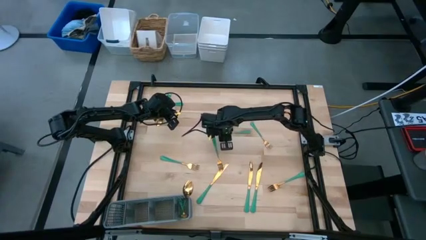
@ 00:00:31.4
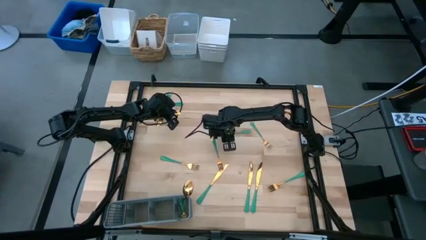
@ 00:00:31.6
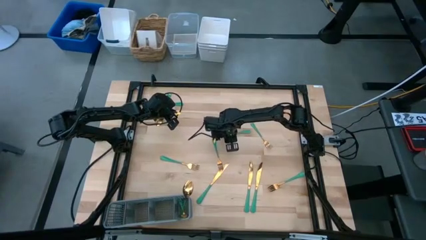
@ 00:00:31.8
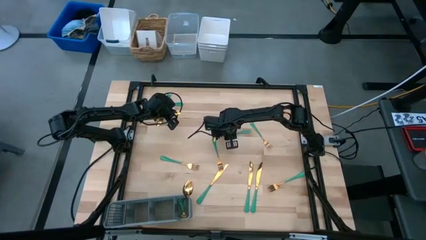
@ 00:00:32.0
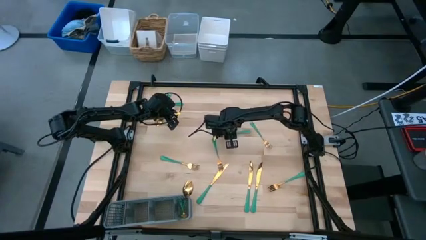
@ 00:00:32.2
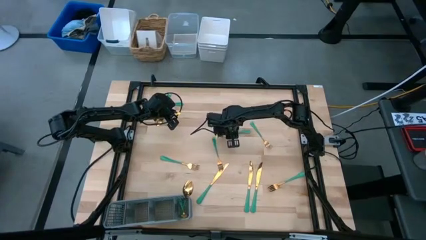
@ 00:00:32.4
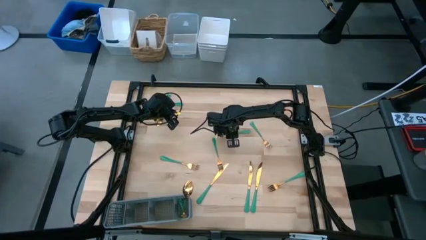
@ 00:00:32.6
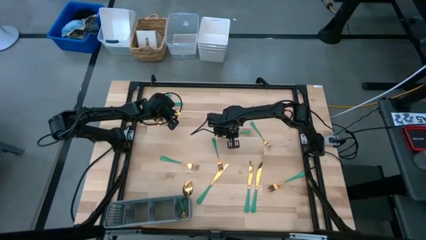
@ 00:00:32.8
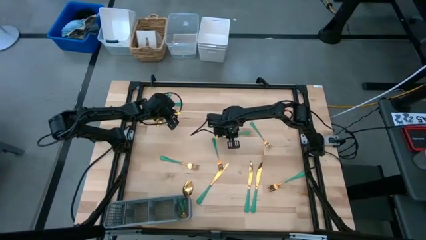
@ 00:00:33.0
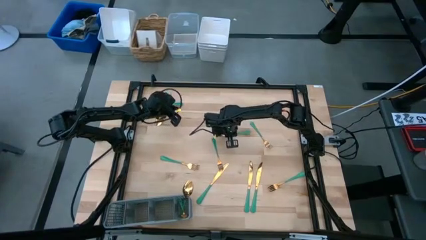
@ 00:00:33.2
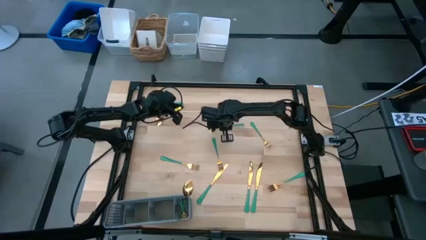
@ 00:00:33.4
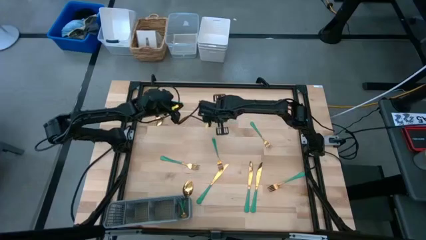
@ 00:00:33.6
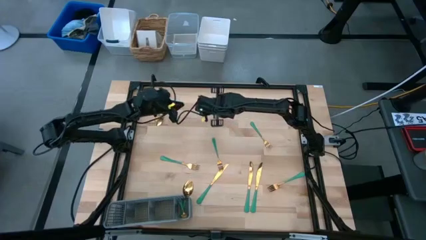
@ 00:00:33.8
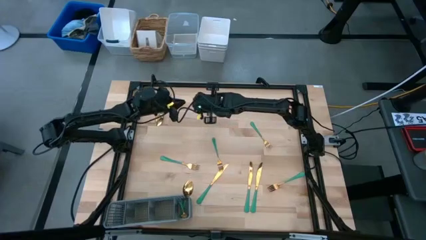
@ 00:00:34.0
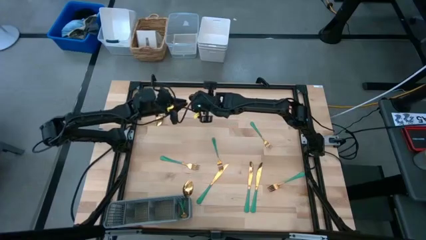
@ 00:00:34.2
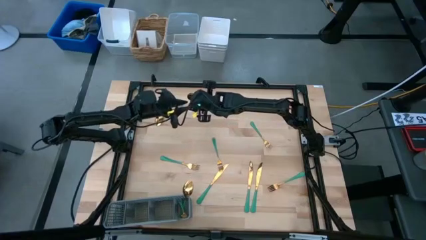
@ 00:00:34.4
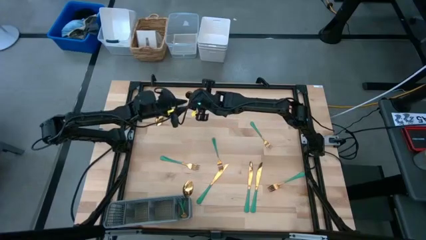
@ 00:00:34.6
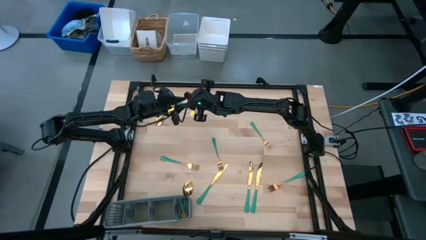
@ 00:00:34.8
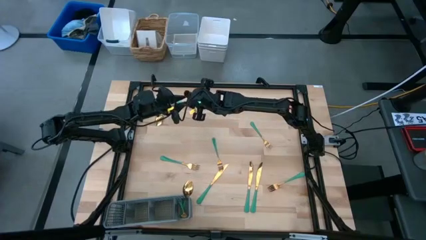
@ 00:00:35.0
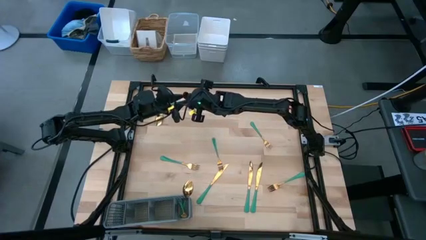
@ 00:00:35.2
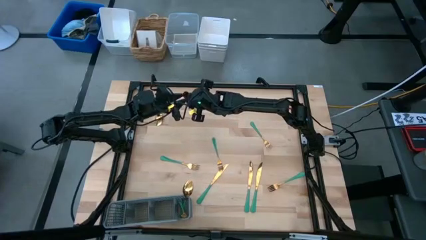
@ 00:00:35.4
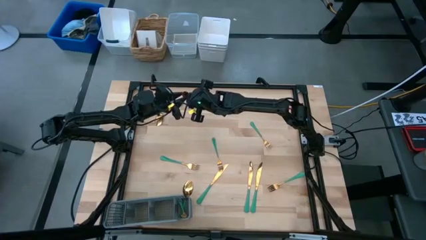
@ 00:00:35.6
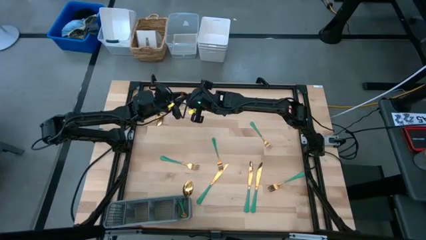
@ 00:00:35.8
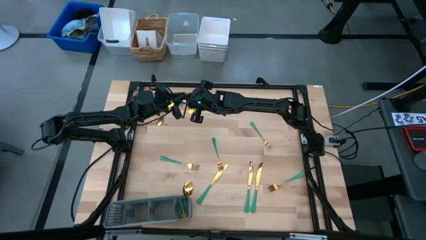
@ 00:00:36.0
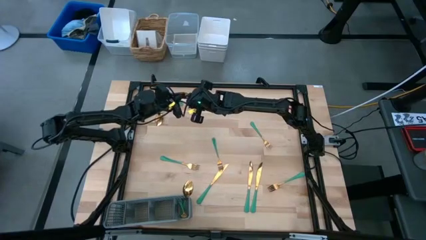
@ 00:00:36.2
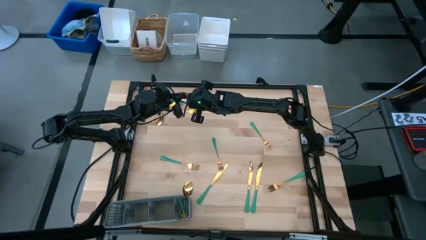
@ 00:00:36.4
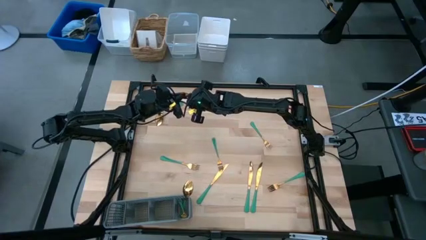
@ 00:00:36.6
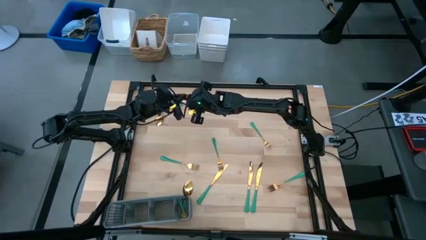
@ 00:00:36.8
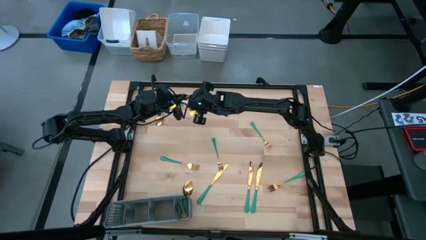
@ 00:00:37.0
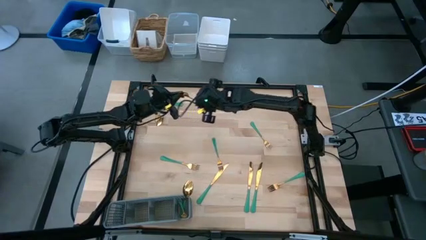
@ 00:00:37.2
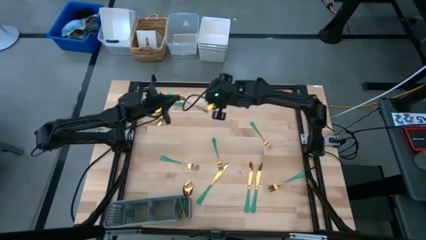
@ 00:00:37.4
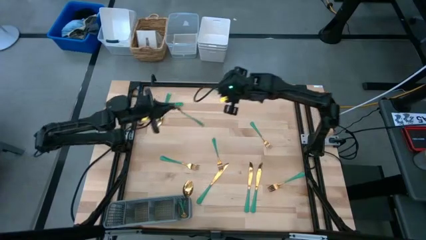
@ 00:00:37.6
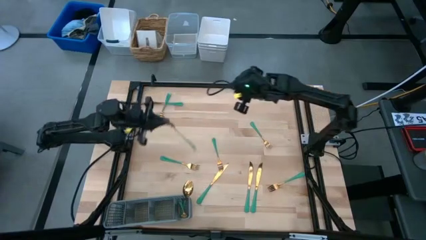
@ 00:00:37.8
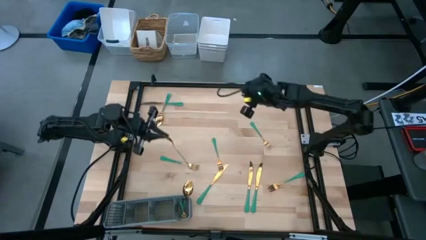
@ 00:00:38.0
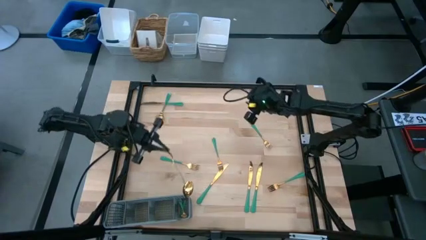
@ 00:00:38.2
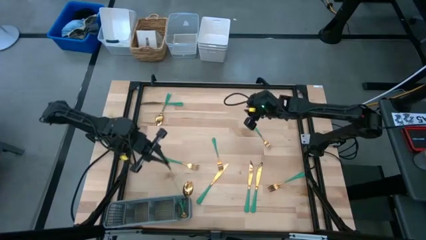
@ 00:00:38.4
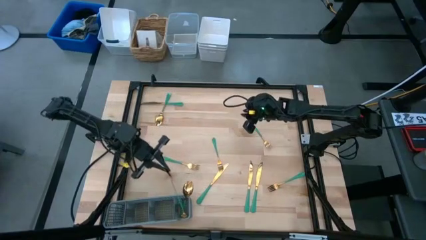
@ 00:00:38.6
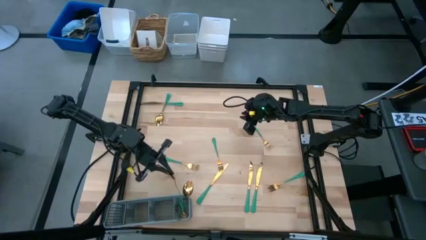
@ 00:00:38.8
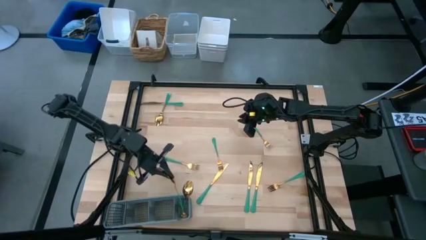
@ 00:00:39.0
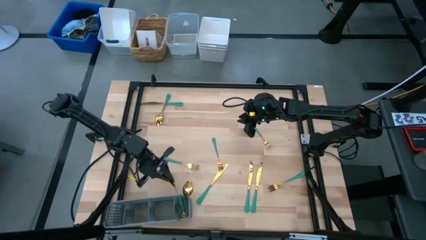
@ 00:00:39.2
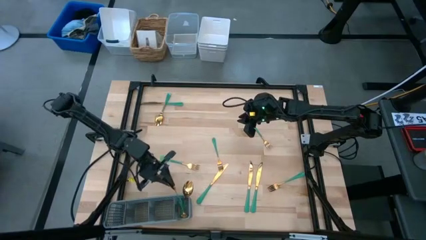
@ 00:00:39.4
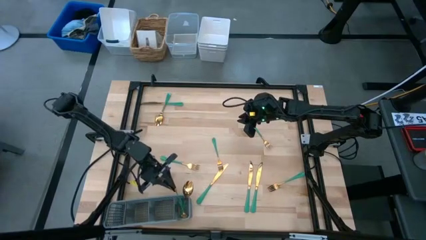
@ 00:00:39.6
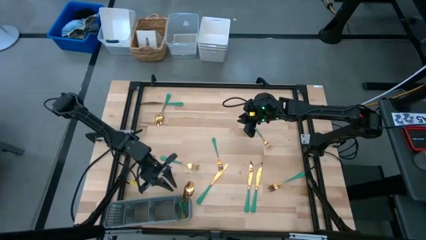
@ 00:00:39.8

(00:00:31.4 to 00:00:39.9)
Task: Sort silverware
Put the right spoon into the cutlery rack
